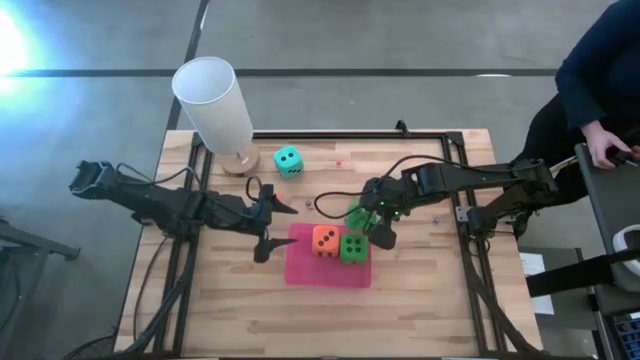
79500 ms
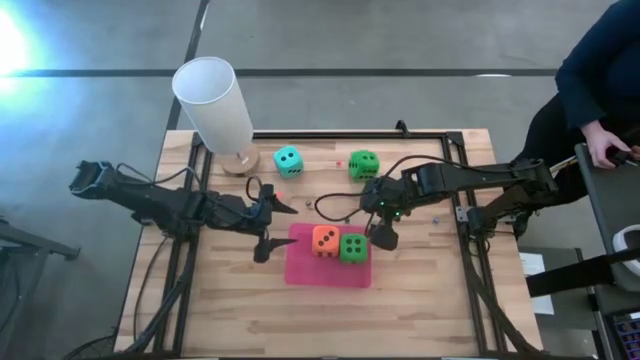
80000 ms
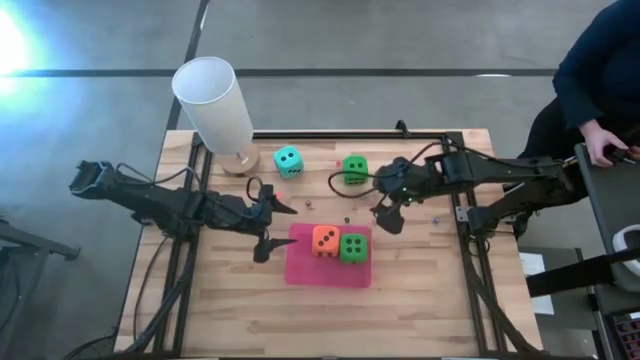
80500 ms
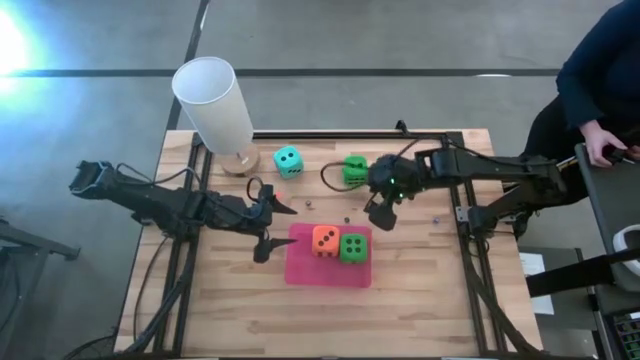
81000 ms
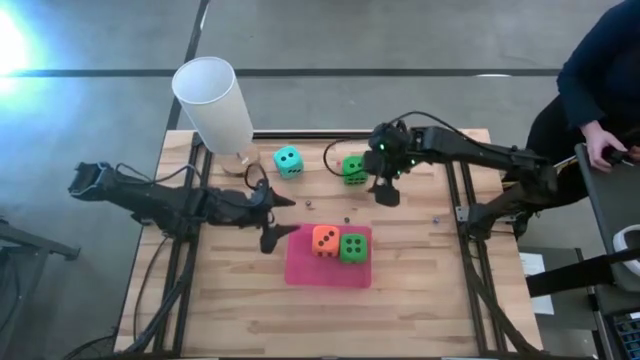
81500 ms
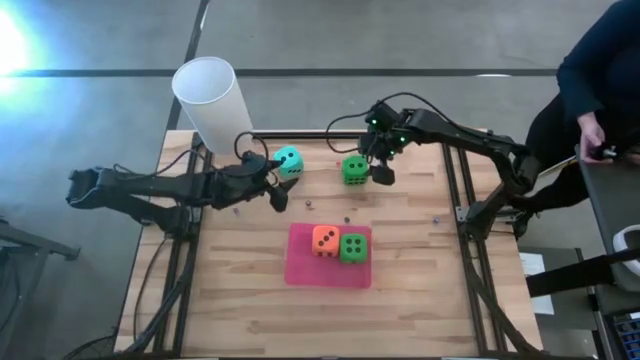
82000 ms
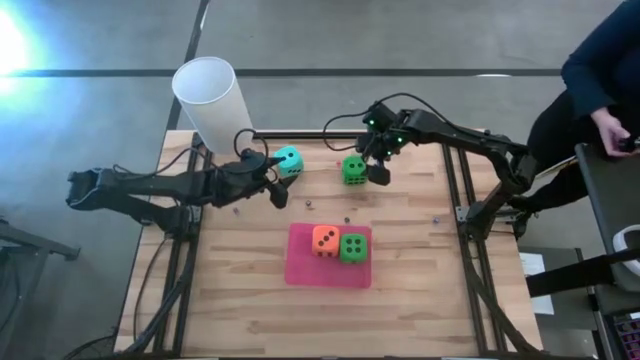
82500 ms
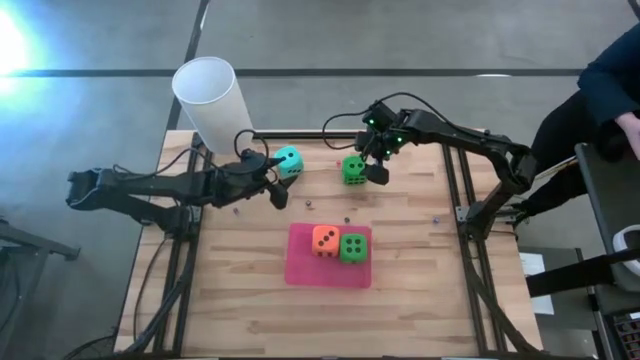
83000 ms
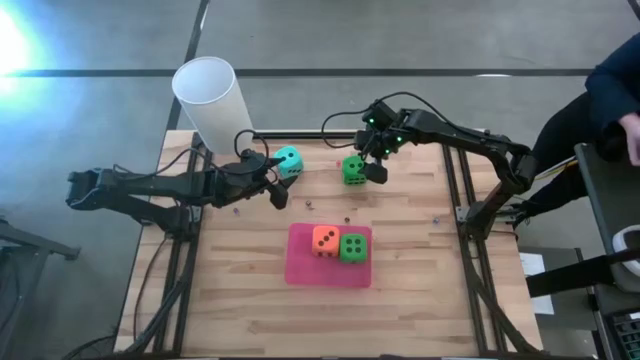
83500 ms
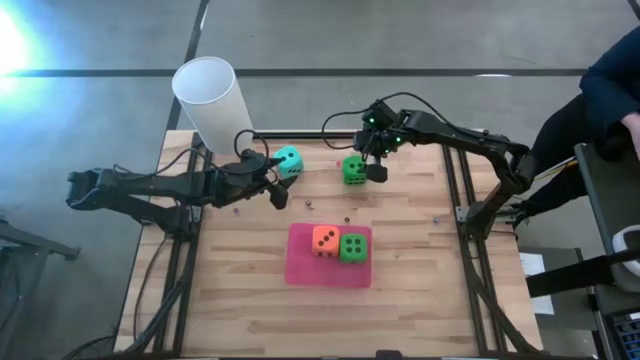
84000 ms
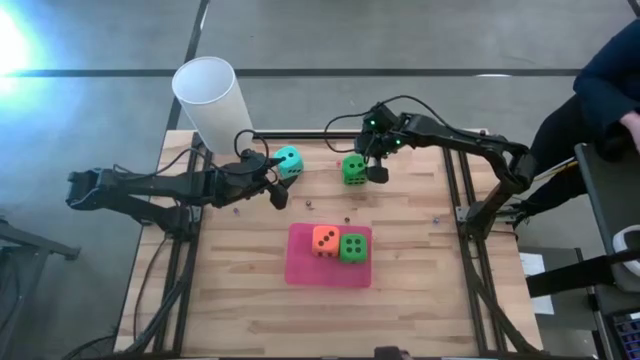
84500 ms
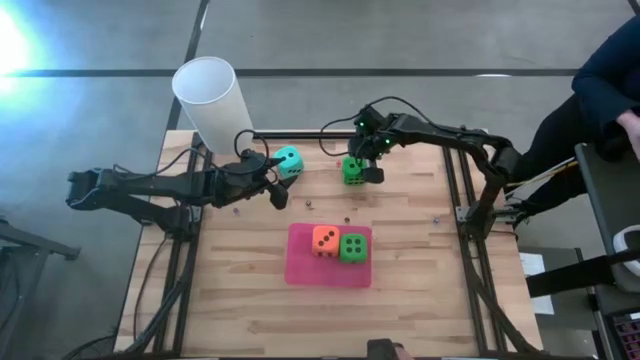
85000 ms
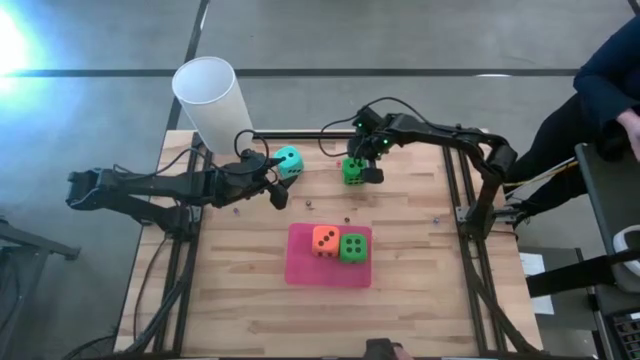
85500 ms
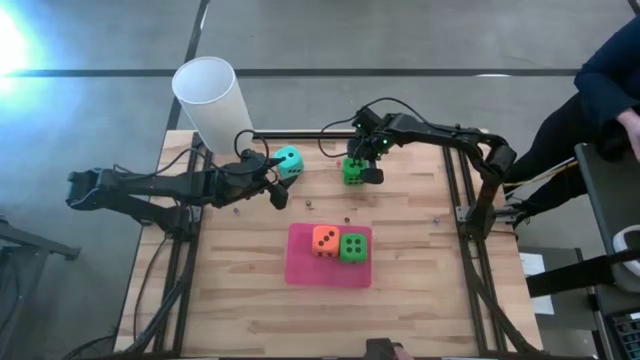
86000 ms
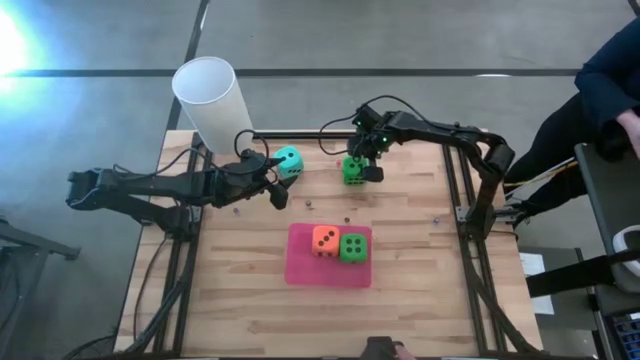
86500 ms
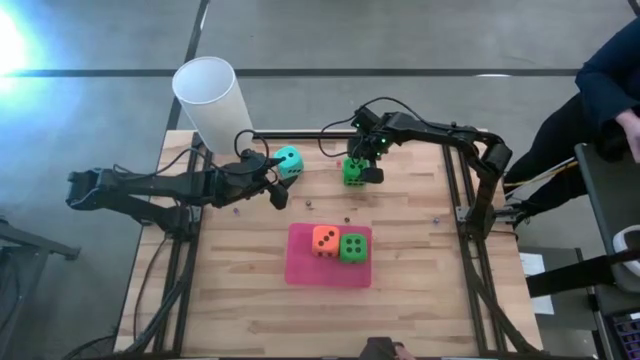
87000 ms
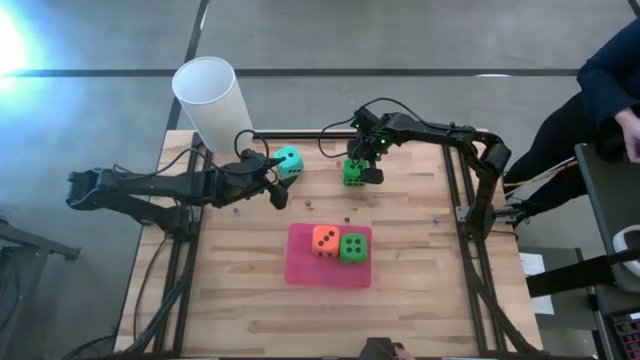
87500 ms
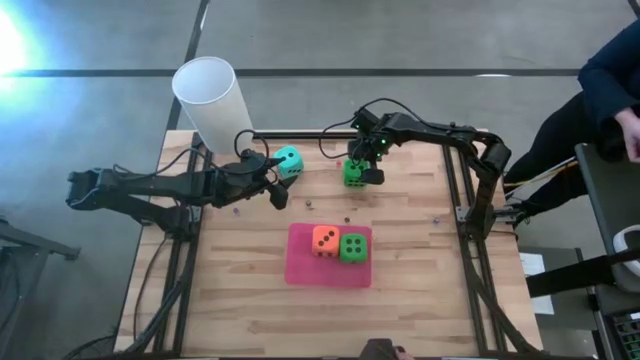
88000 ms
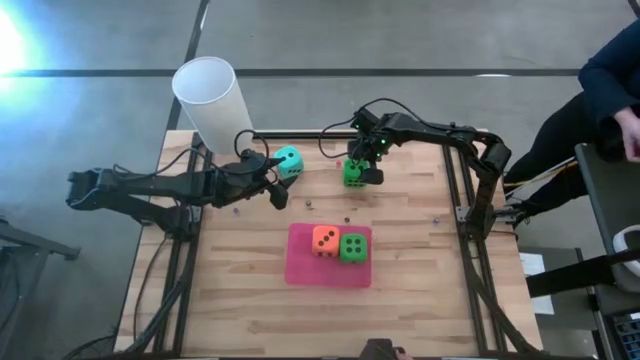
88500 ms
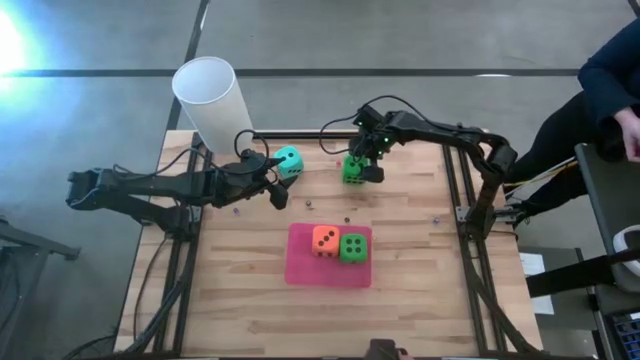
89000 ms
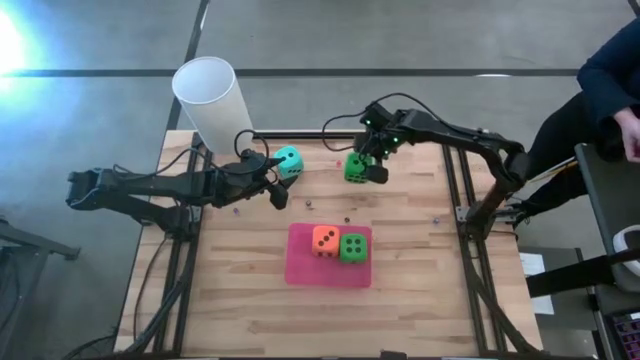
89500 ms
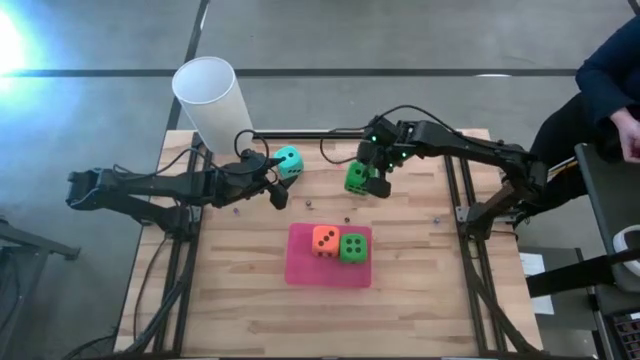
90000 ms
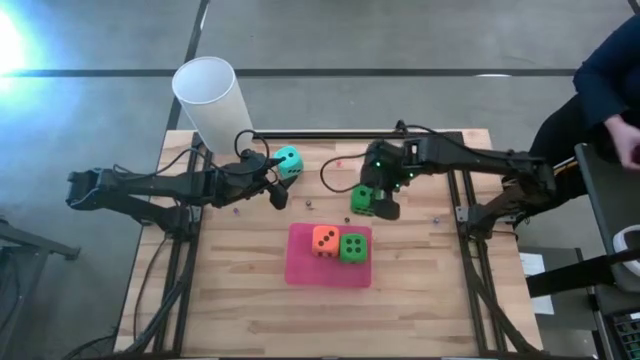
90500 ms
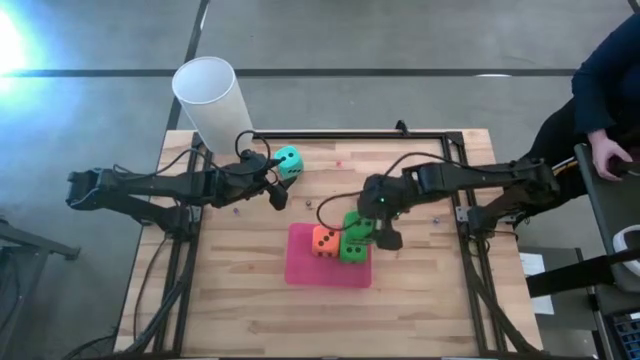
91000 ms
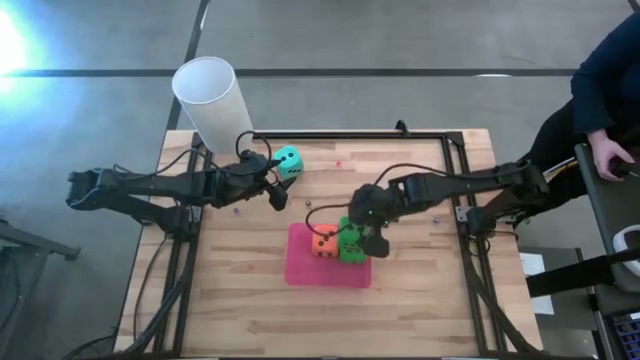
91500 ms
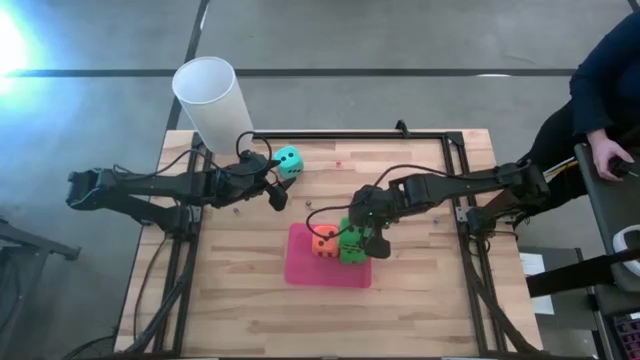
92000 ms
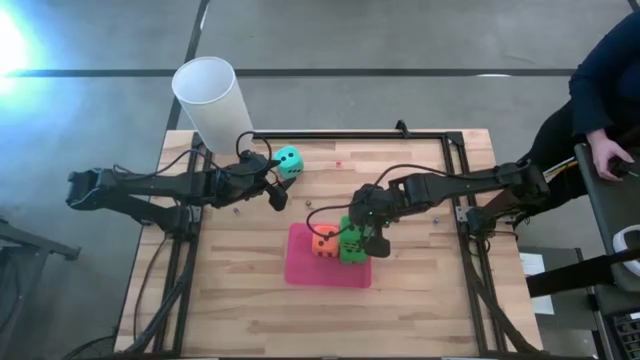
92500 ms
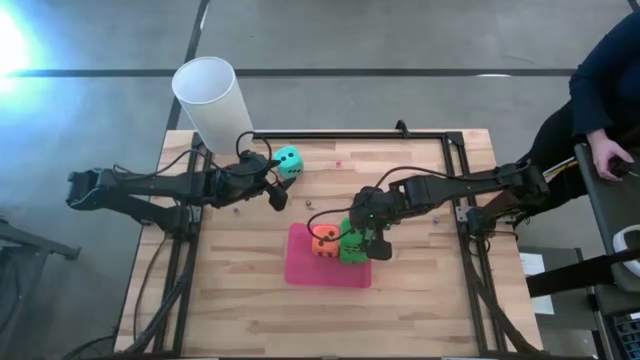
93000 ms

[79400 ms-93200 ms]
Task: Pick & Place Dice
Put the large green dice into the pink bin

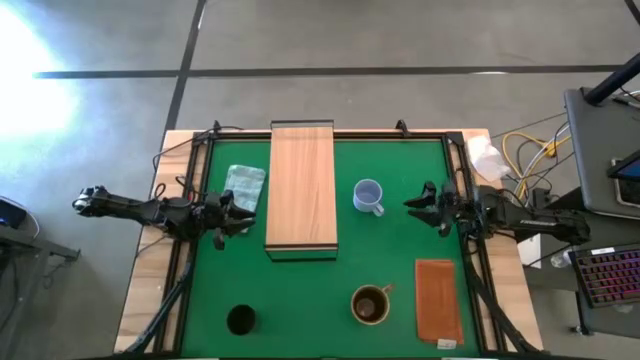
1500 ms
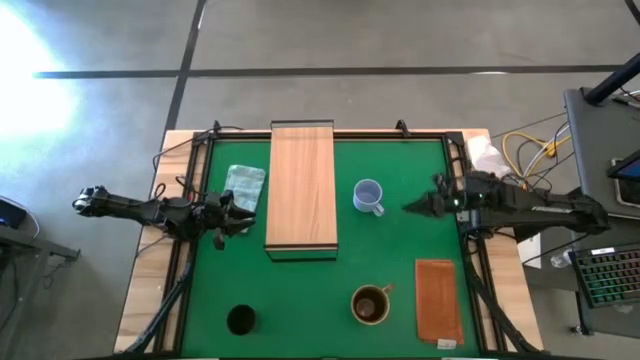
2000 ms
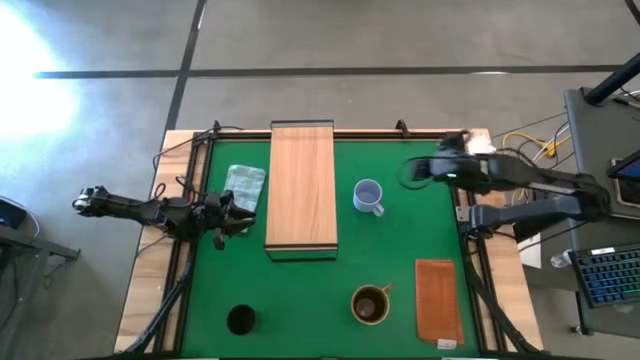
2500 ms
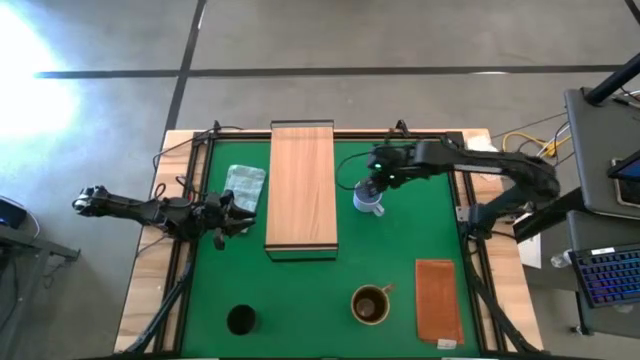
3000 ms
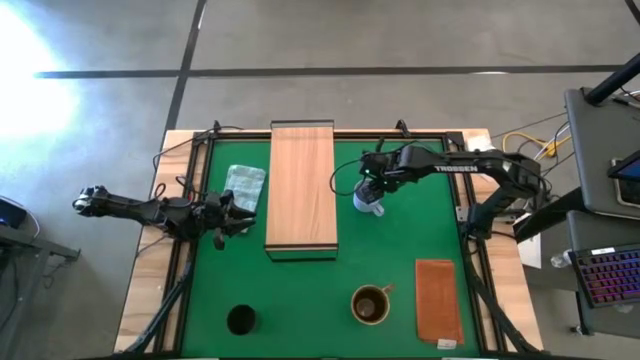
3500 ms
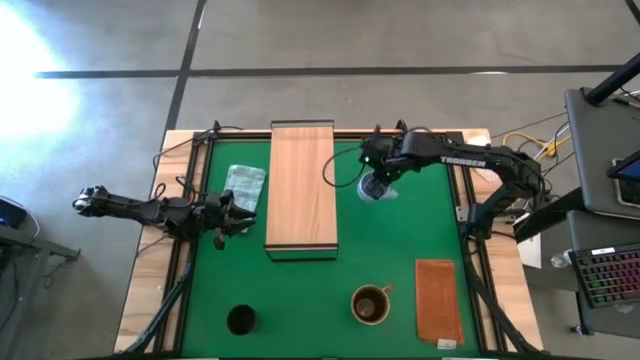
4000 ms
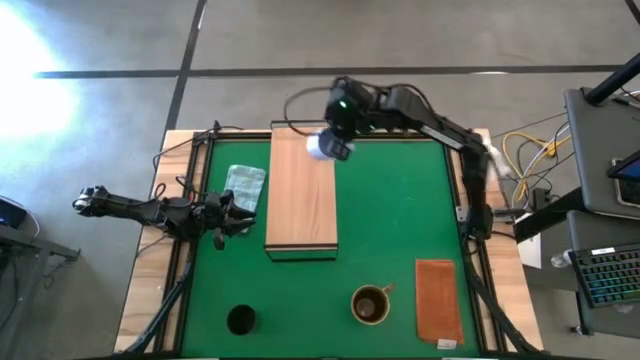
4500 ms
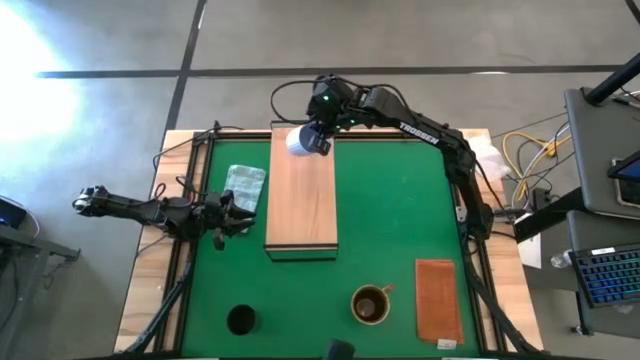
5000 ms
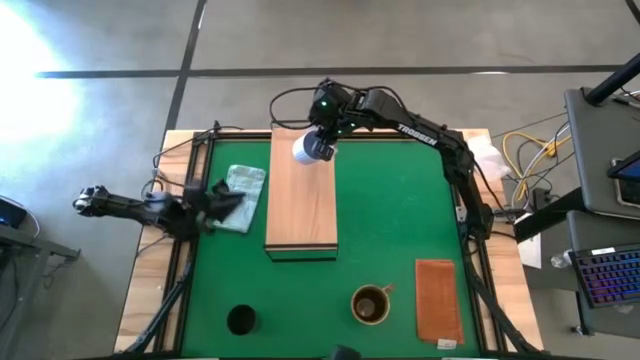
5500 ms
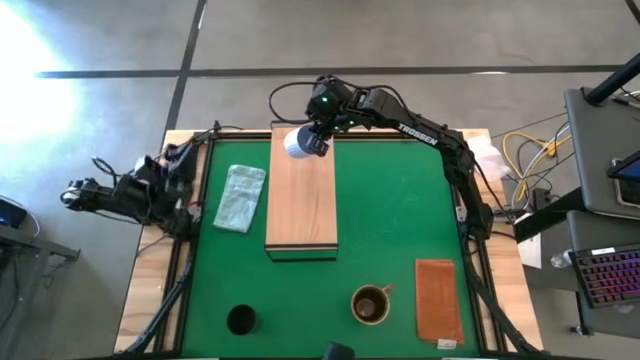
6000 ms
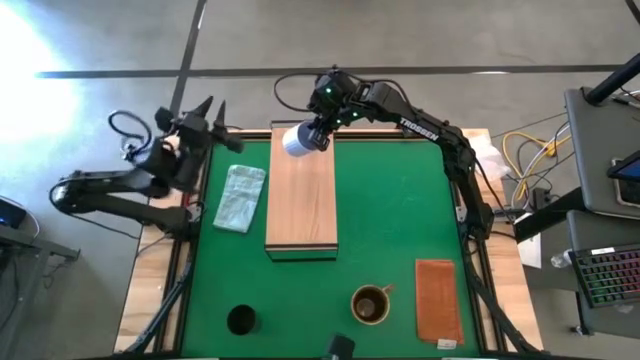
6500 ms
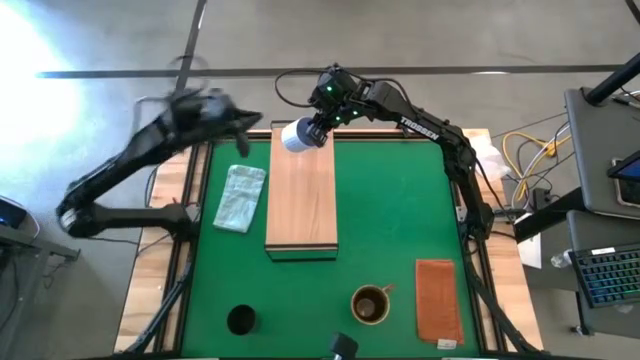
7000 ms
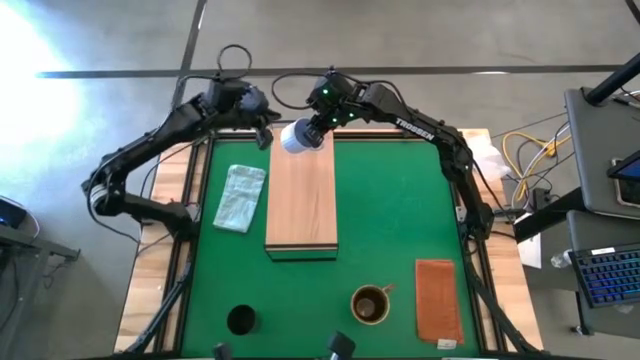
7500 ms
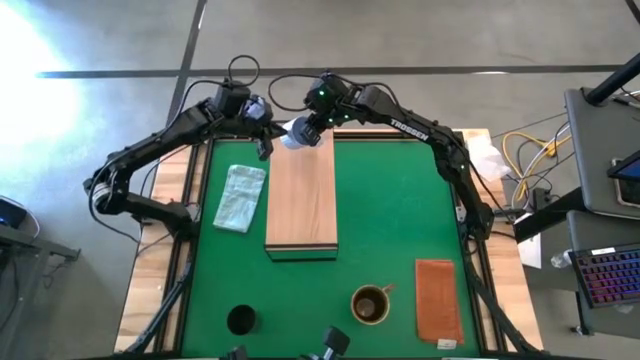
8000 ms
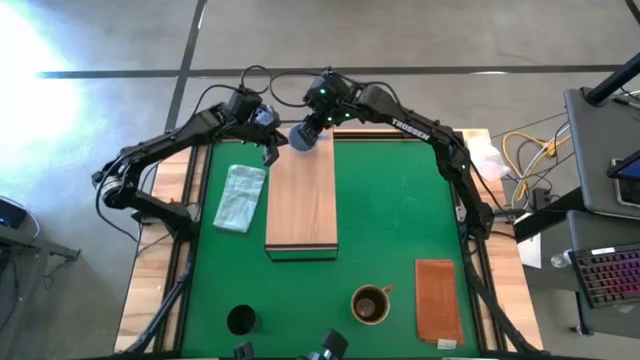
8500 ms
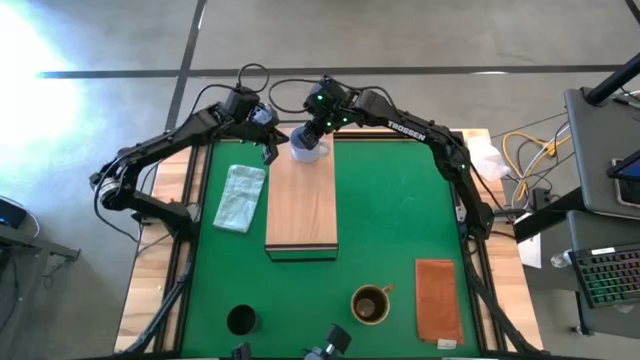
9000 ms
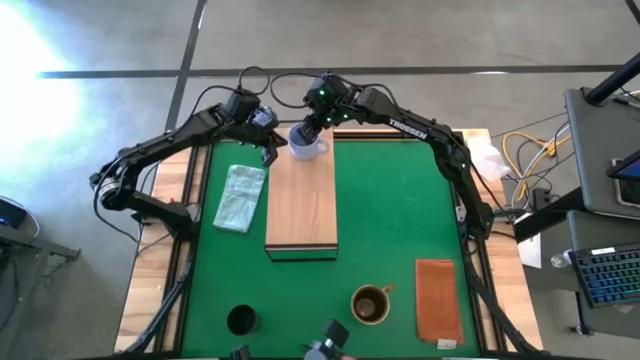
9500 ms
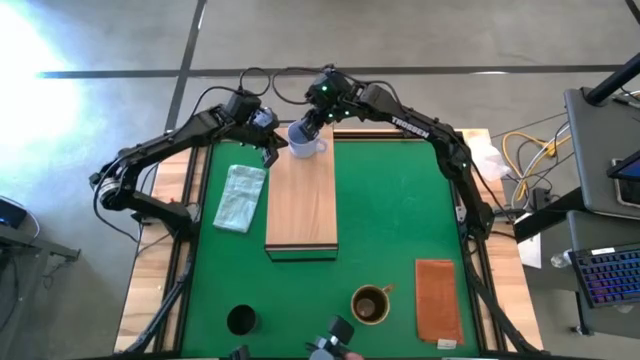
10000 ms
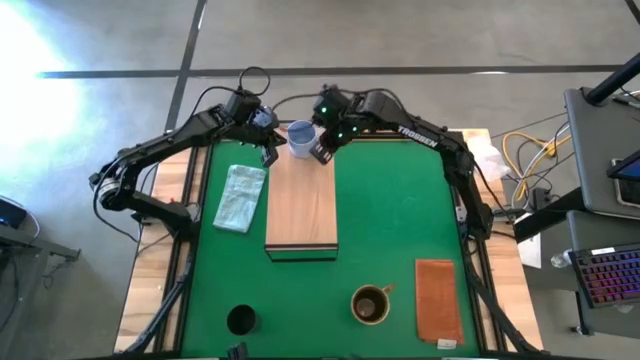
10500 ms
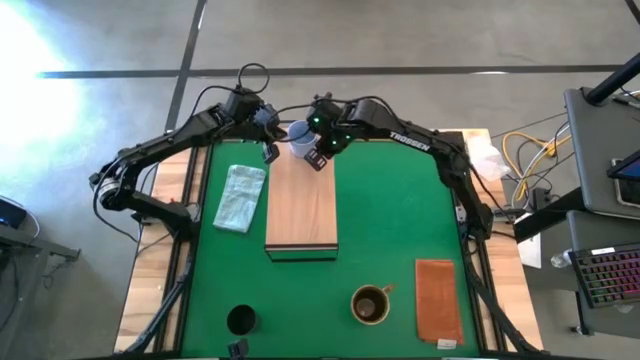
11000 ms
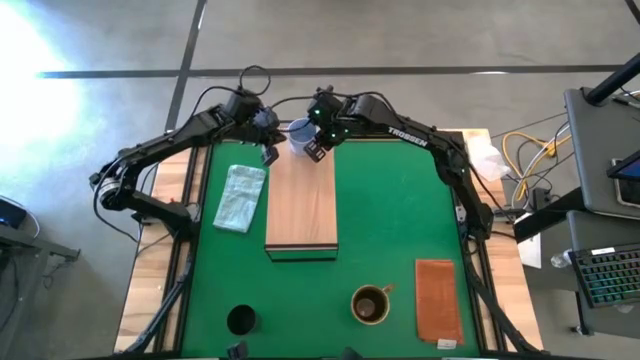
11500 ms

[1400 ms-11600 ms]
Task: Stack small to large cups/mugs on shelf
Put the blue mug on the shelf
